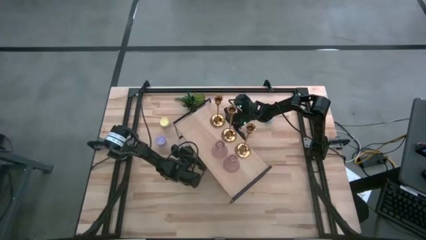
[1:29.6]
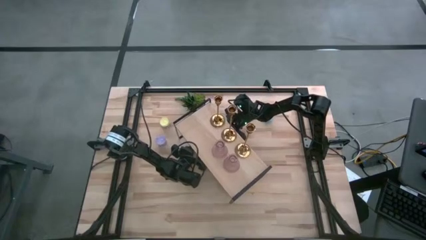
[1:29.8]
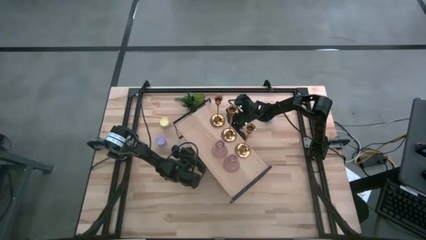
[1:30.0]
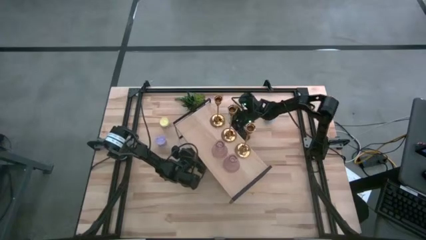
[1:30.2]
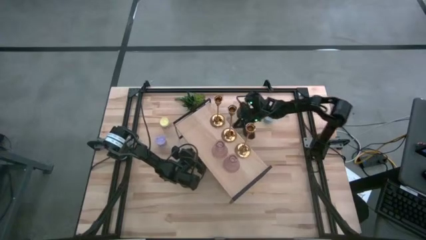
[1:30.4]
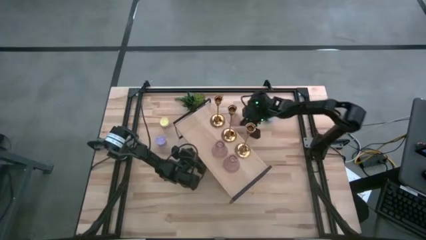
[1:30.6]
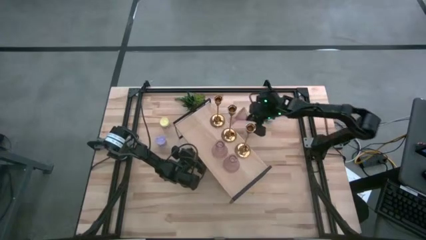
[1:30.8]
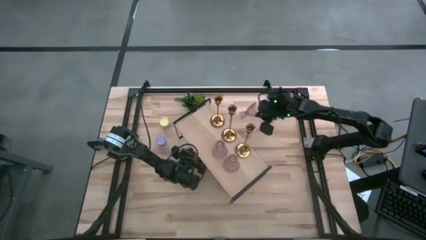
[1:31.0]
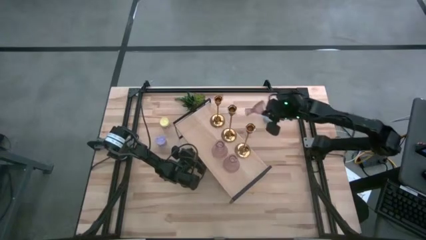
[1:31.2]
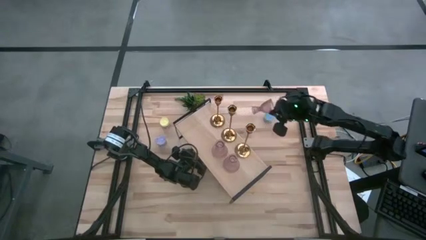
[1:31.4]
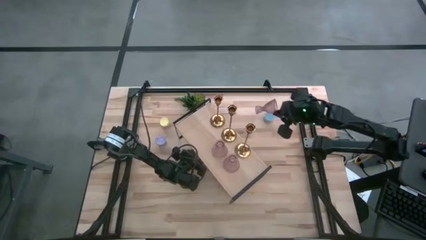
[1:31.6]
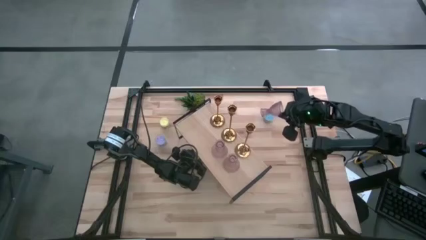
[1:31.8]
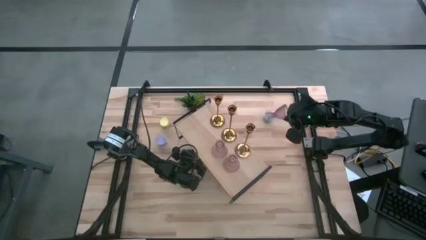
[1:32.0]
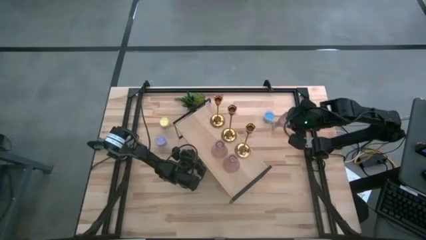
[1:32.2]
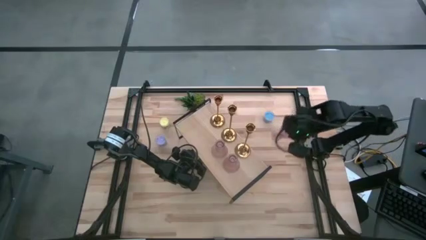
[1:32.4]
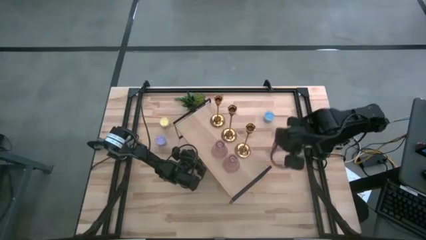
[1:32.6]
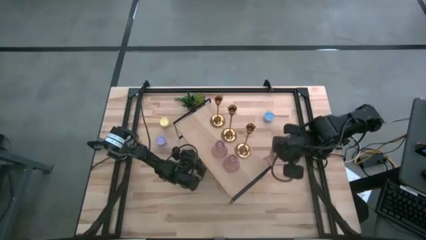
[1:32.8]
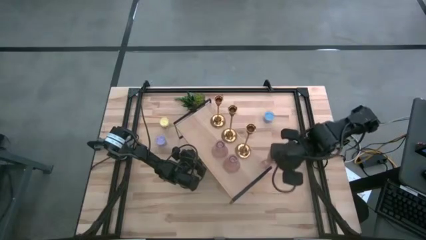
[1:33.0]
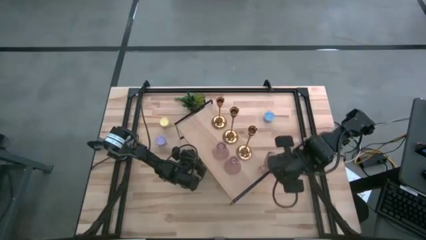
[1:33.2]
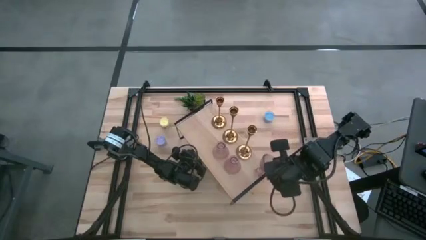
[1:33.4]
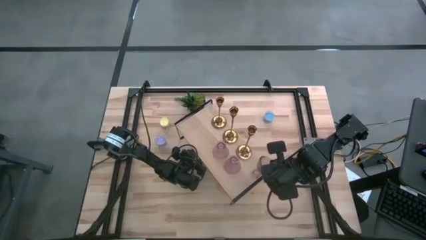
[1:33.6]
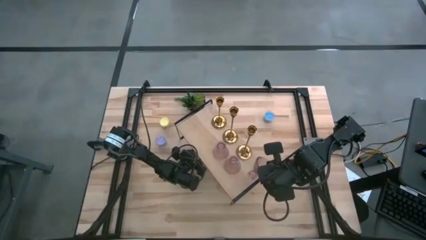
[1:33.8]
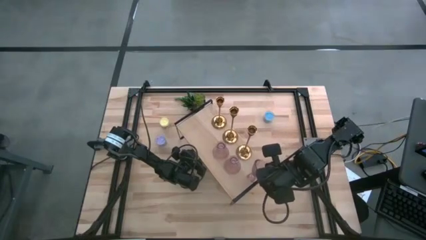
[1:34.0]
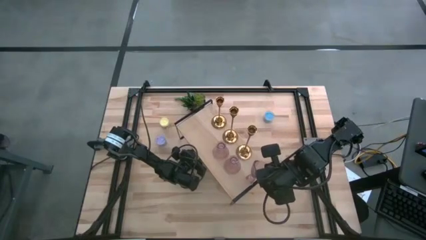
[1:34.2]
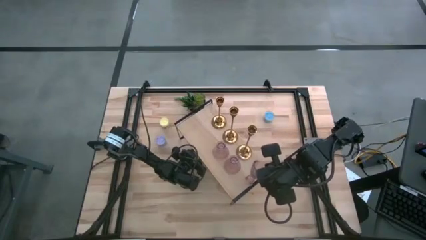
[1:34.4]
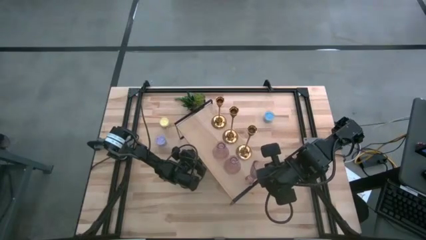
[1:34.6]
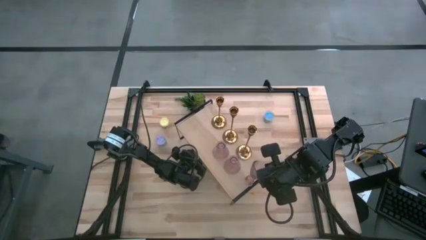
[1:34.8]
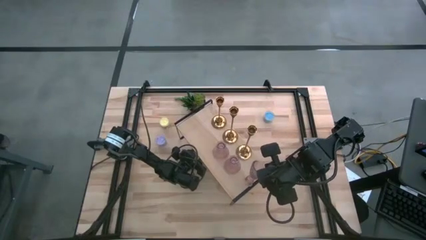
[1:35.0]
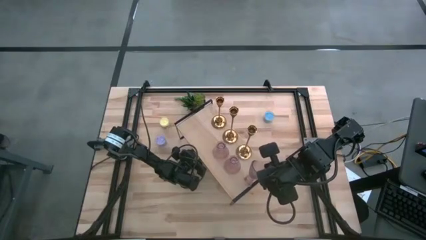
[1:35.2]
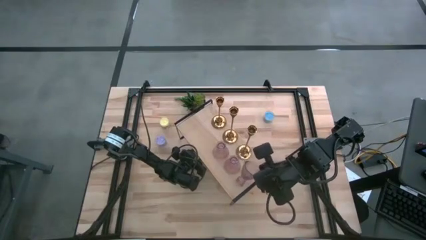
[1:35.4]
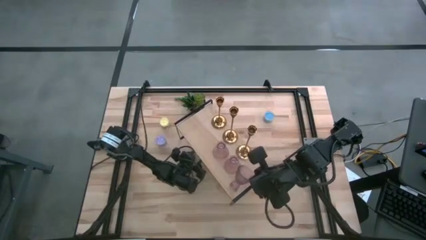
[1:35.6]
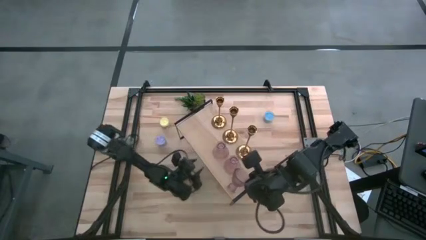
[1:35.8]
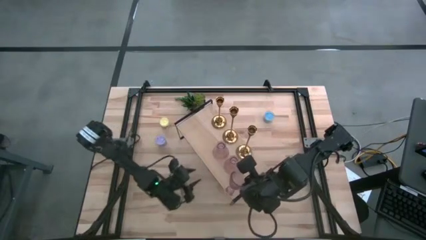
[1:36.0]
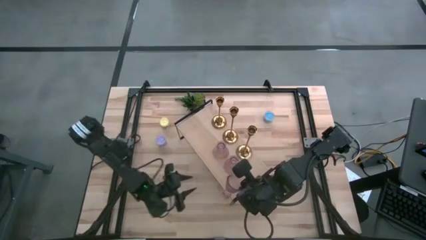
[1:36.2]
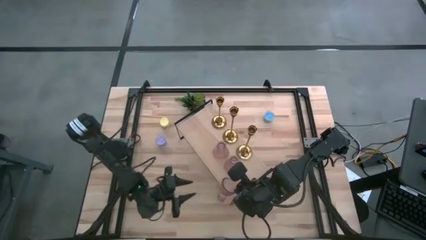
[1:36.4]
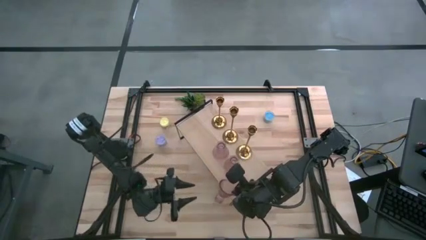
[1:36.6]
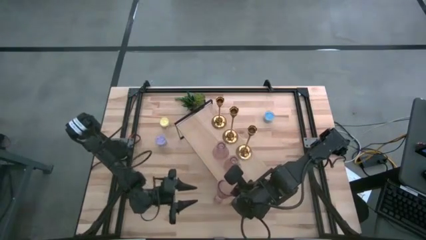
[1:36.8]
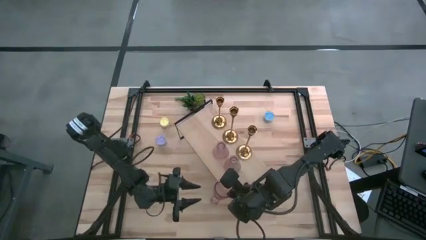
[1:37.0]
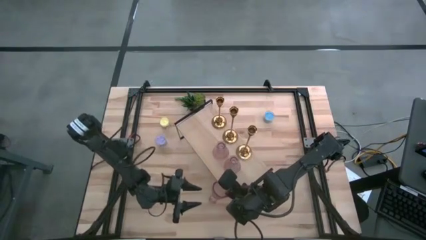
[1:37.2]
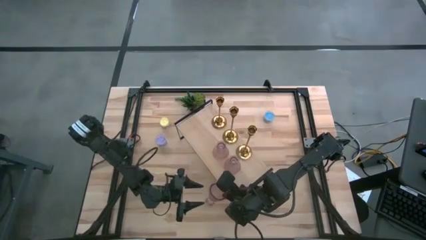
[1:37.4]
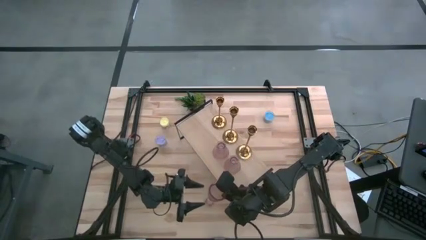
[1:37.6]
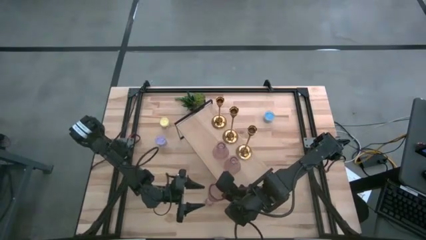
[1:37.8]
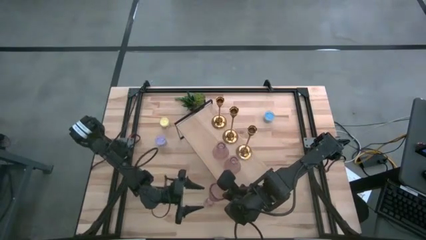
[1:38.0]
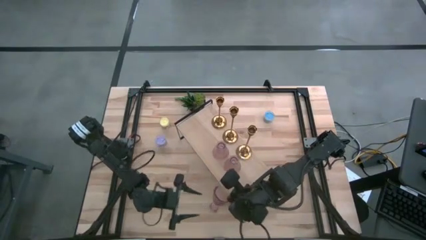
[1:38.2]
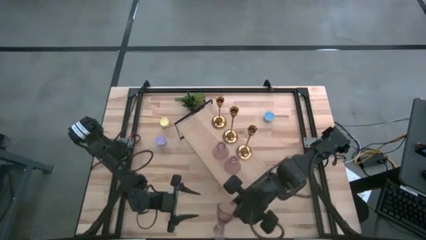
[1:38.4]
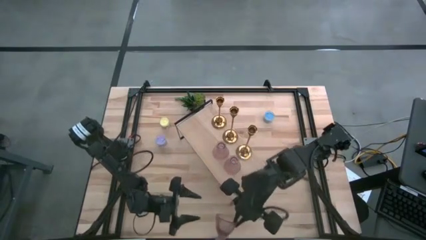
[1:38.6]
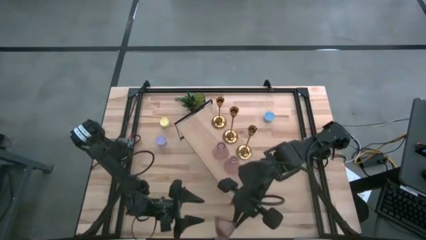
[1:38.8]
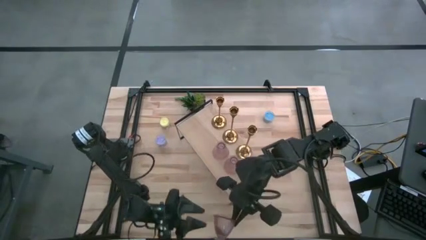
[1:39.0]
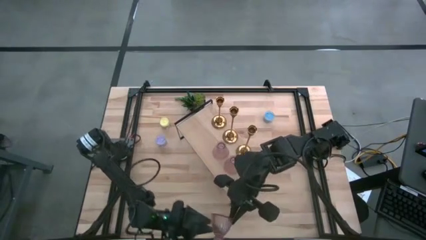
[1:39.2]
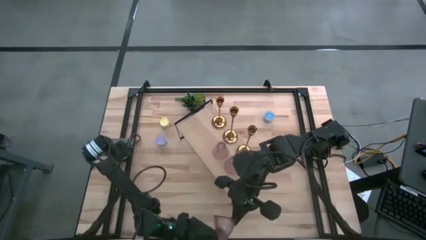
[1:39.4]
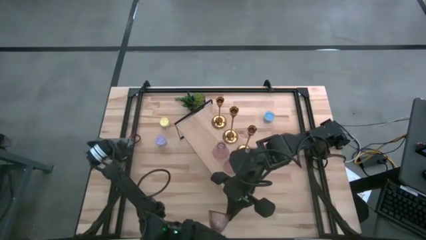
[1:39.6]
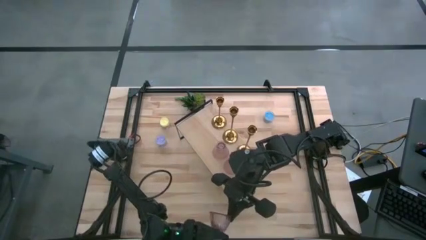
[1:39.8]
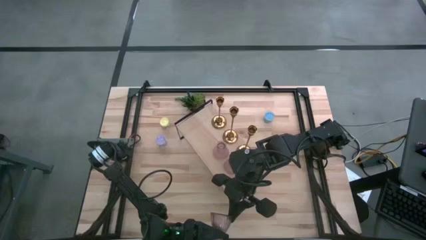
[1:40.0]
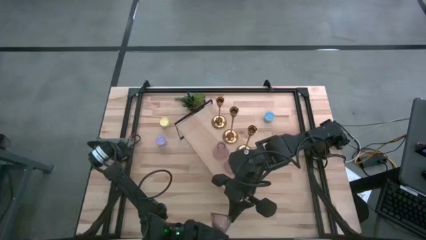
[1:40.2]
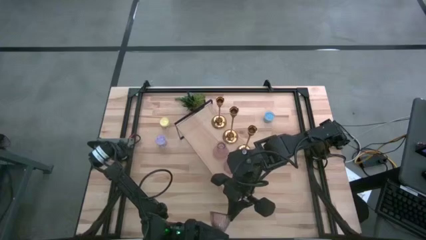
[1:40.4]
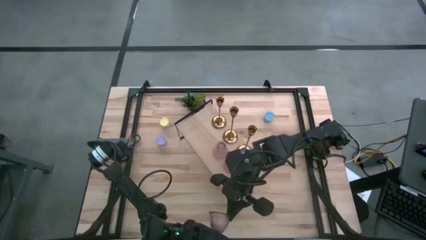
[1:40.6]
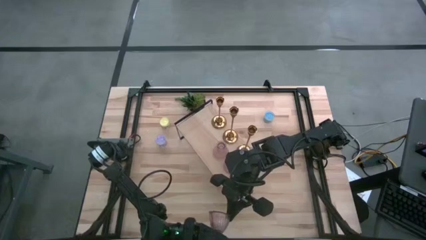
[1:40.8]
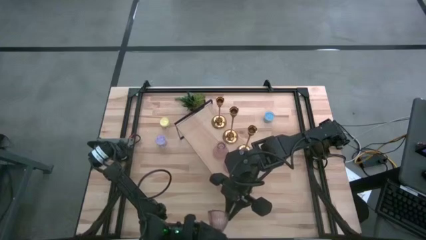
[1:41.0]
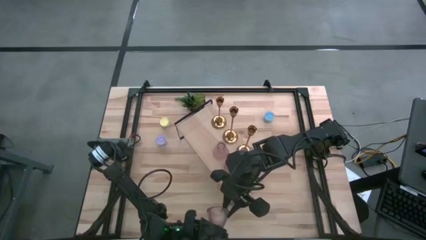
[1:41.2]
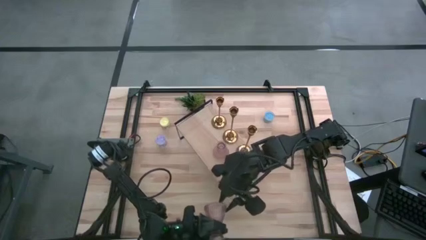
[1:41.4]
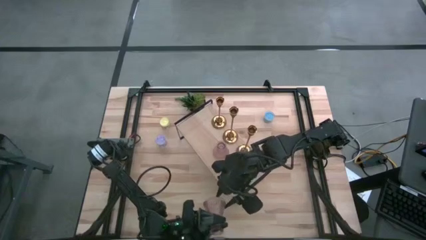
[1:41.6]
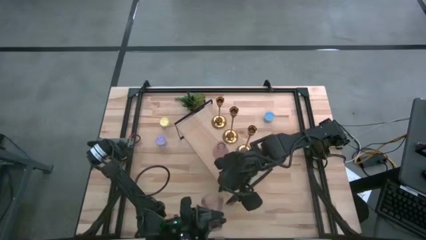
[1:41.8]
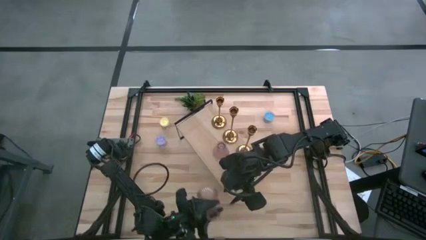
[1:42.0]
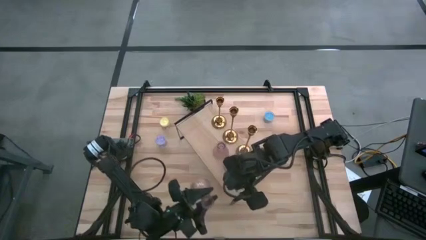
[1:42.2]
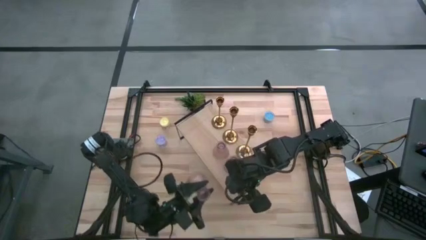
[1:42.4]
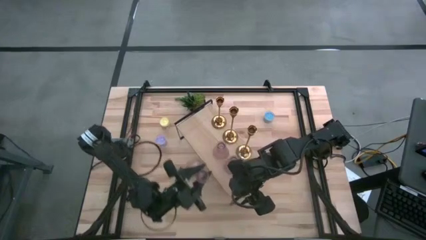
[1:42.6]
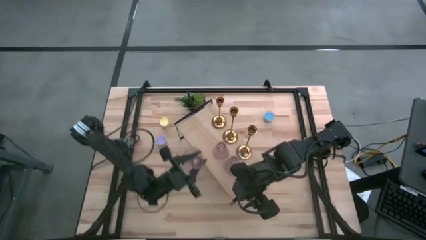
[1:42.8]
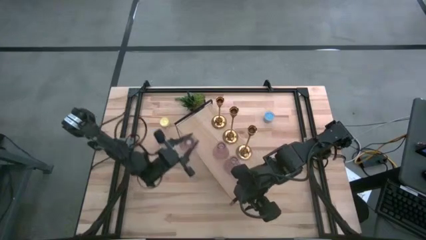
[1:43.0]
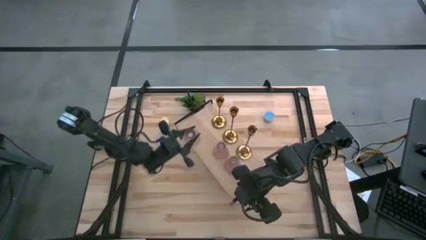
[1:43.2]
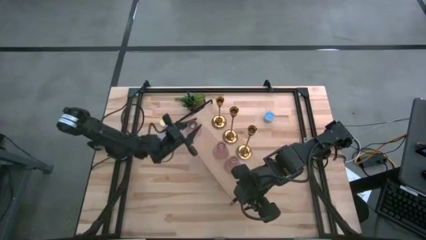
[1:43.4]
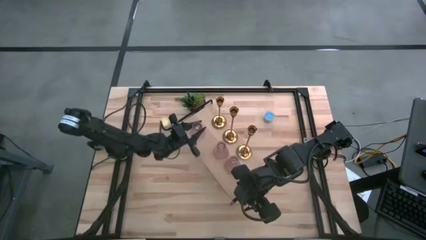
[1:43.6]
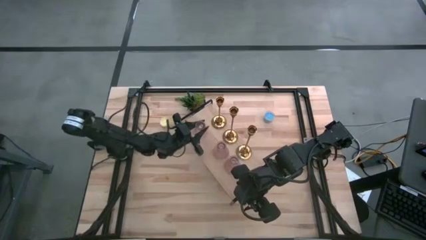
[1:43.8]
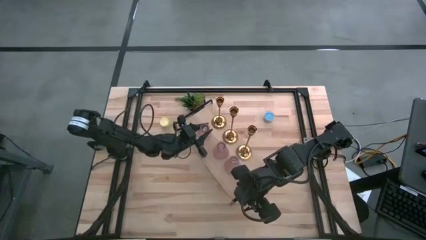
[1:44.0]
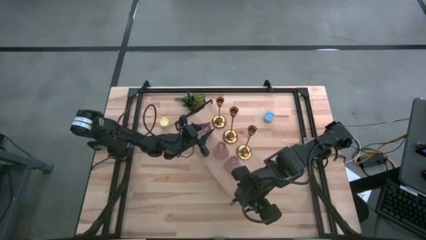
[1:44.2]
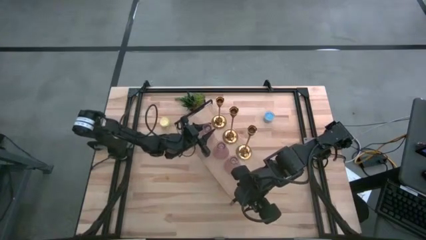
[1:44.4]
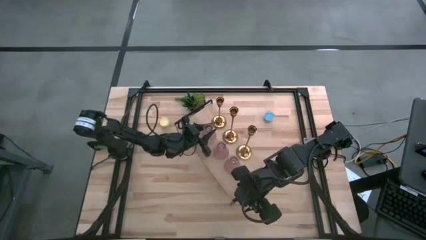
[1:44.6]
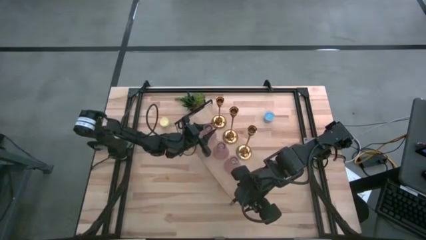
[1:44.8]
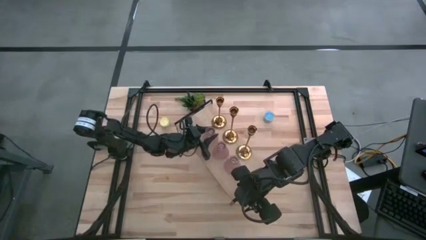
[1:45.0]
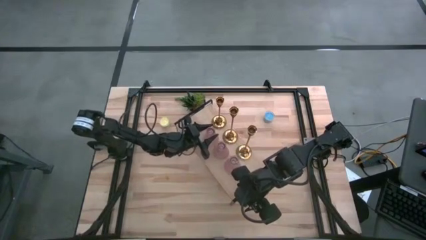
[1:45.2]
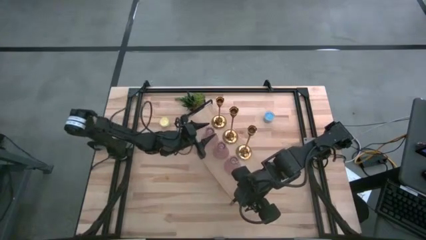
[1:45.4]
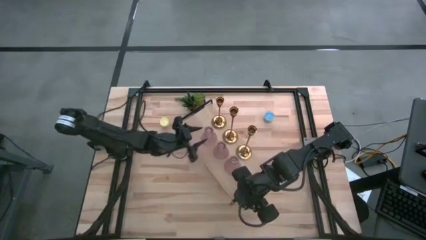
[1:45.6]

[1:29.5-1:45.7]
Task: Pick & Place candle stick holders
Put the pink glass candle holder on the shelf aligned with the other pink glass candle holders
